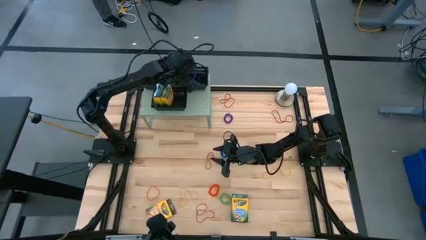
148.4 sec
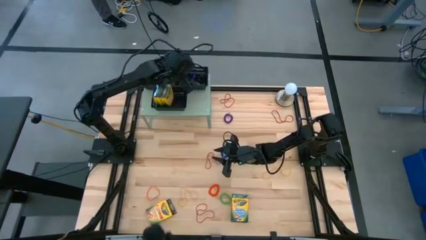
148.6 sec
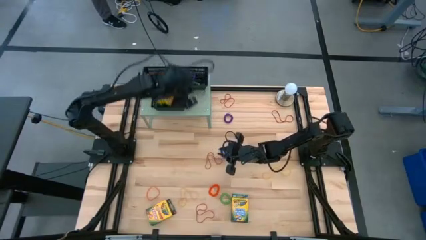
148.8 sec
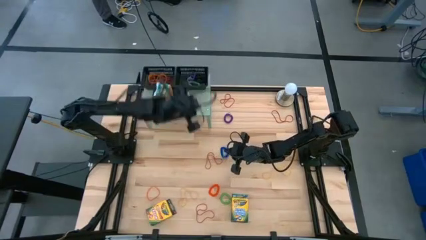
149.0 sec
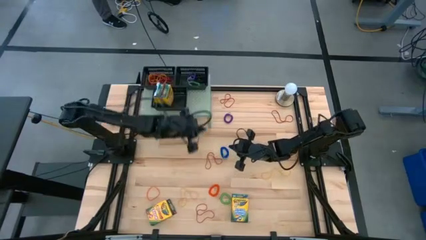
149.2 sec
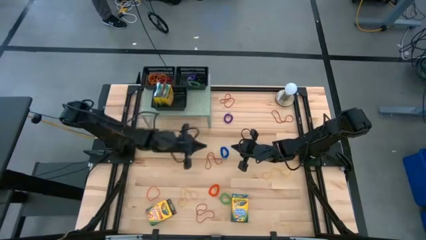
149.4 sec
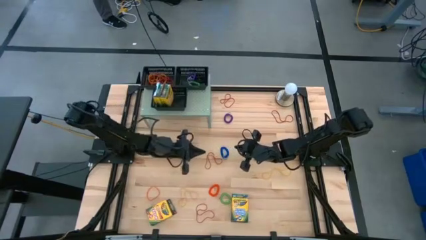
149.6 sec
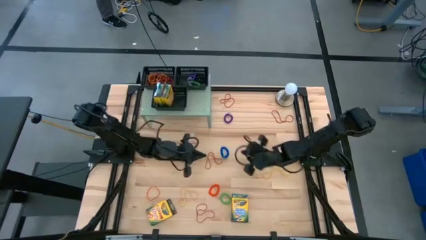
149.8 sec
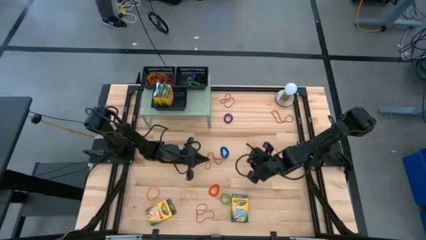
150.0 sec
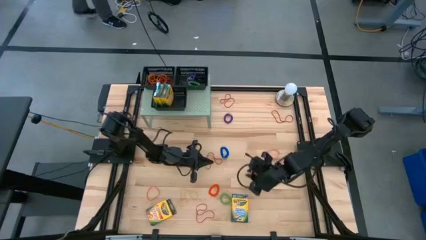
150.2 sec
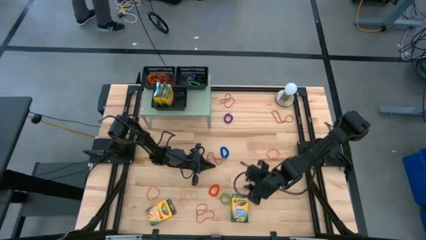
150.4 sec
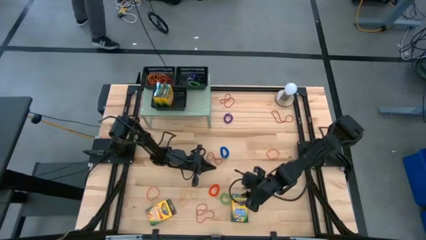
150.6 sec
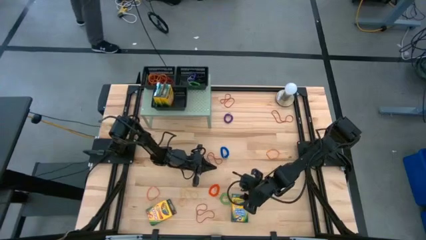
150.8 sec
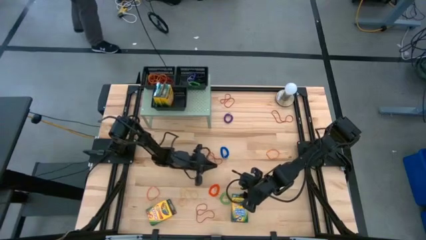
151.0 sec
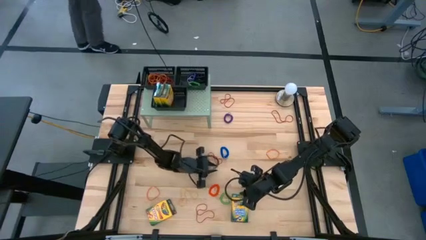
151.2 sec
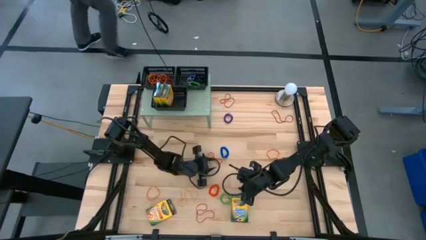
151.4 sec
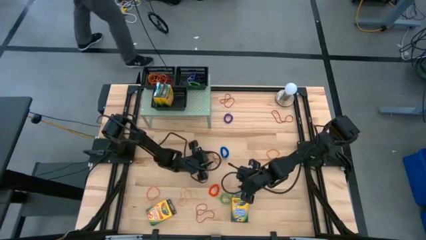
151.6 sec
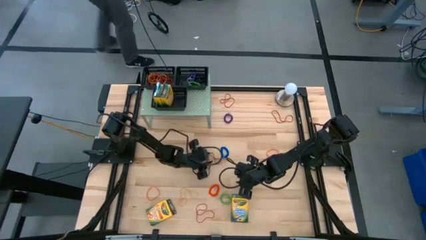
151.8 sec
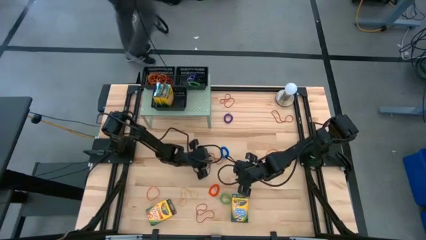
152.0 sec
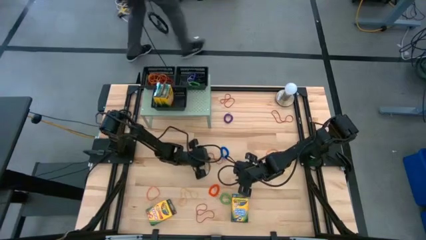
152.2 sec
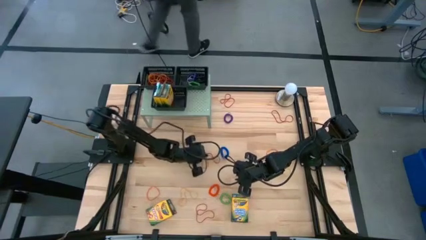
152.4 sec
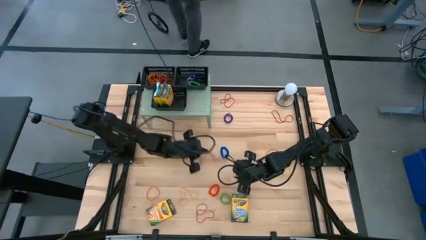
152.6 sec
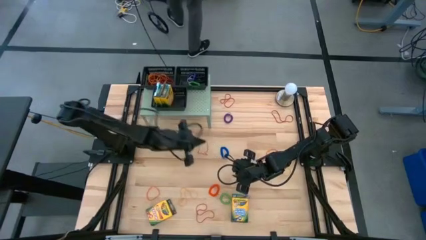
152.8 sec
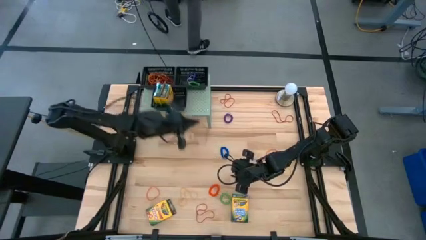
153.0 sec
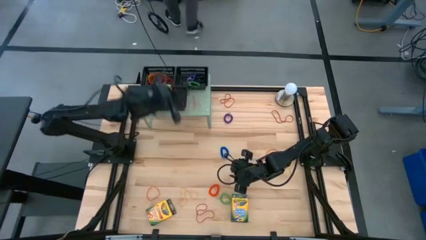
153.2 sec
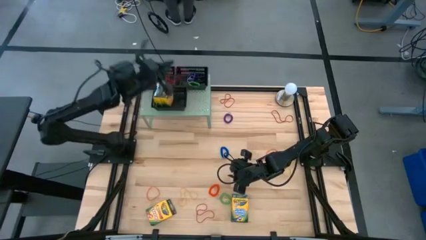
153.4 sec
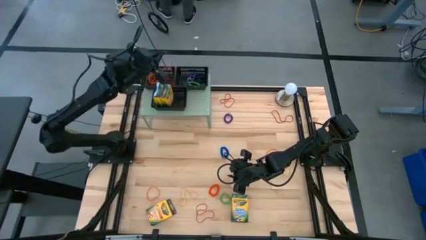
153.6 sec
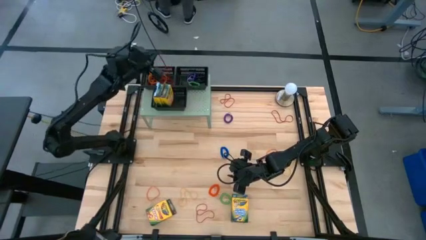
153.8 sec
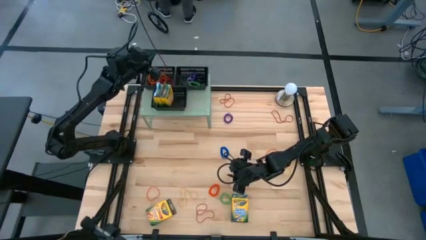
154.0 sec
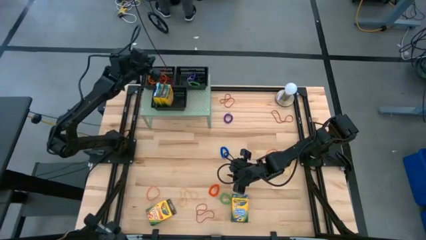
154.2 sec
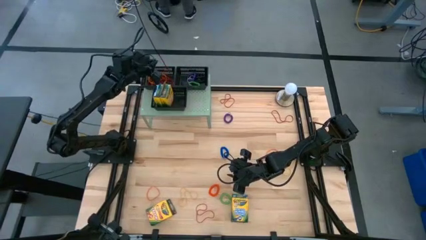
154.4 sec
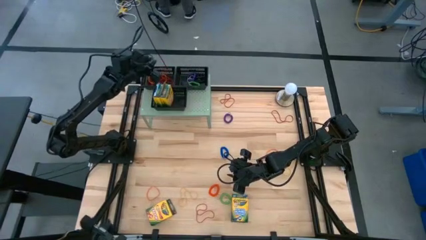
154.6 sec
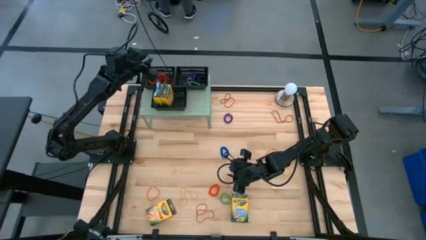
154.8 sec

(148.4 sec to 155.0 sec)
Task: Pick & Place Office Desk Supplies
Put the red rubber band into the top left black bin on the shelf

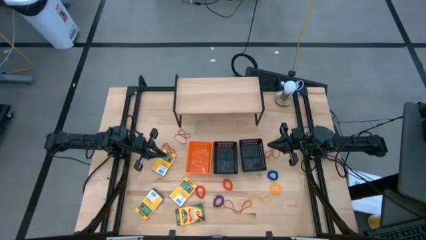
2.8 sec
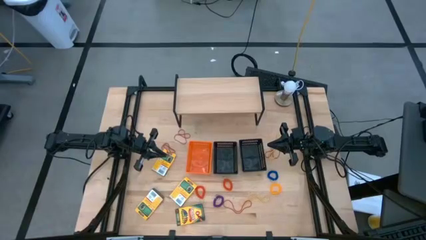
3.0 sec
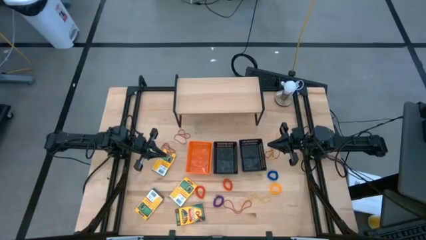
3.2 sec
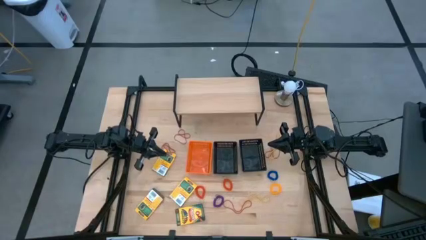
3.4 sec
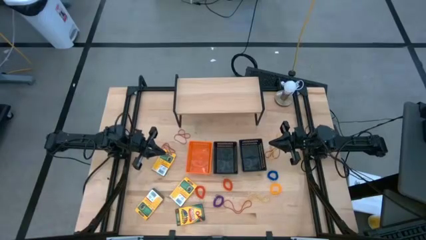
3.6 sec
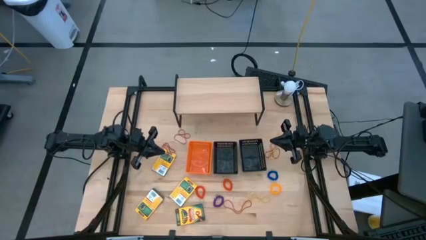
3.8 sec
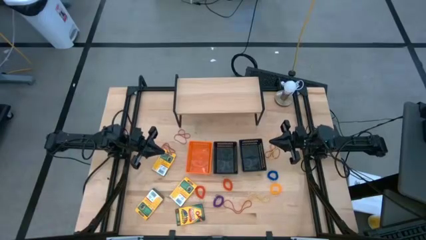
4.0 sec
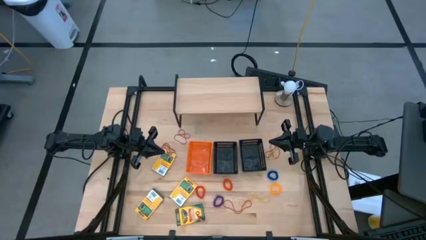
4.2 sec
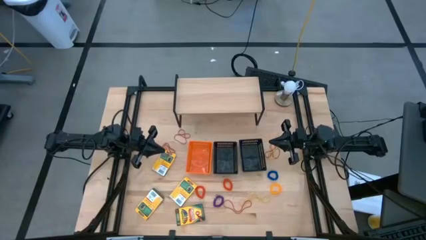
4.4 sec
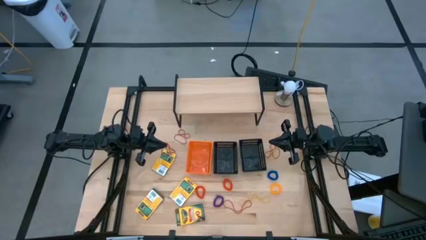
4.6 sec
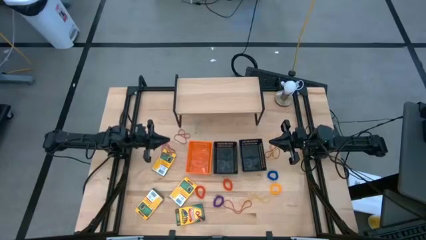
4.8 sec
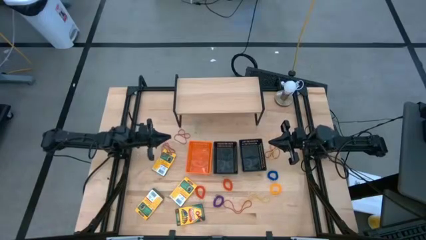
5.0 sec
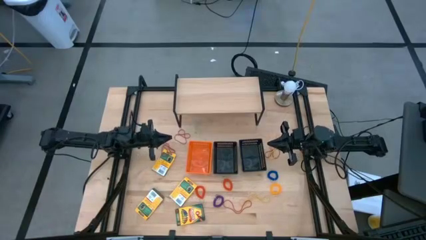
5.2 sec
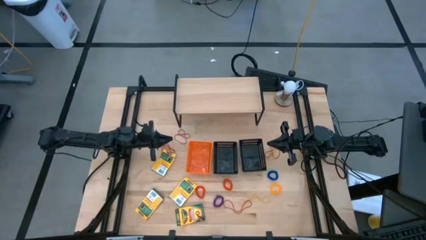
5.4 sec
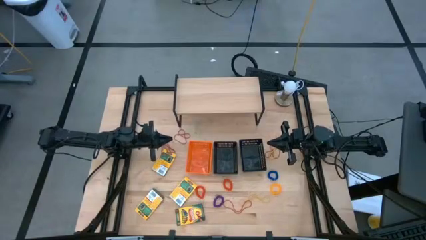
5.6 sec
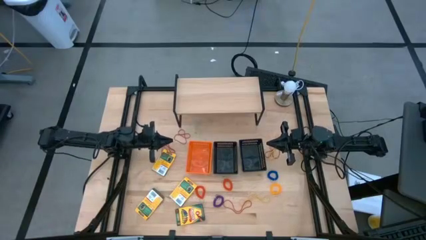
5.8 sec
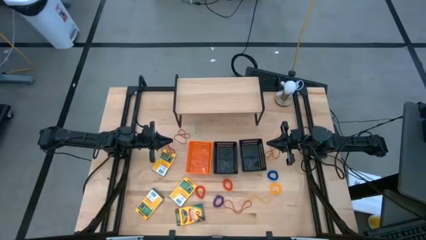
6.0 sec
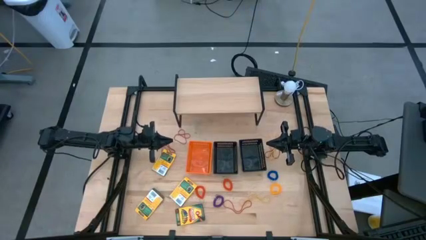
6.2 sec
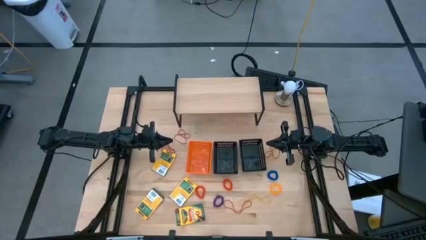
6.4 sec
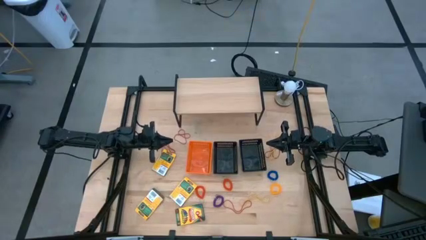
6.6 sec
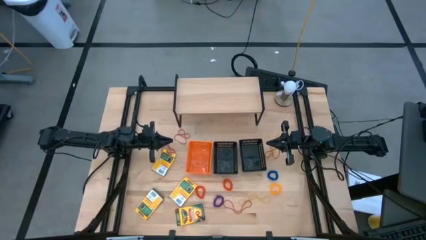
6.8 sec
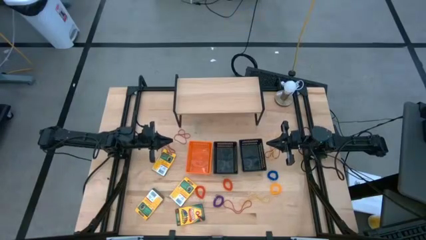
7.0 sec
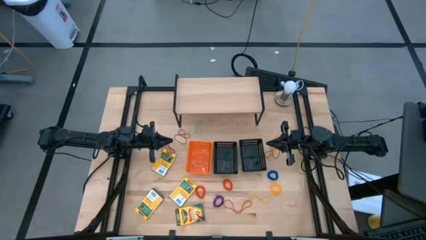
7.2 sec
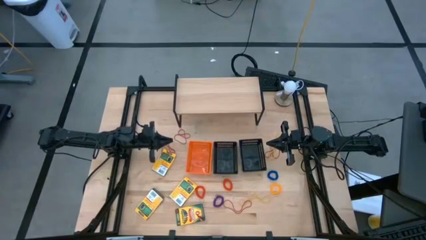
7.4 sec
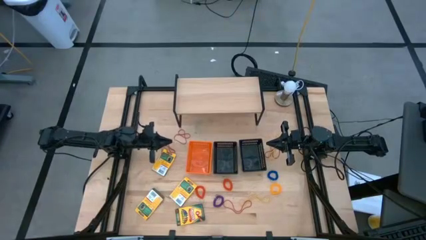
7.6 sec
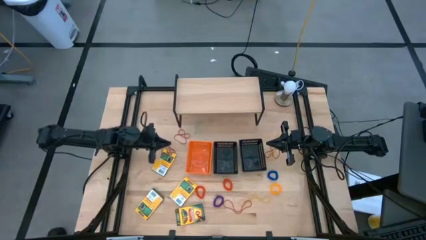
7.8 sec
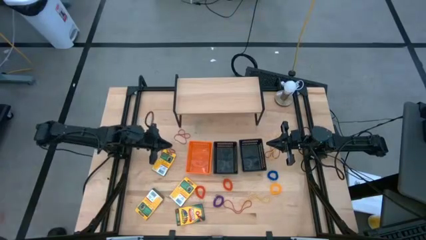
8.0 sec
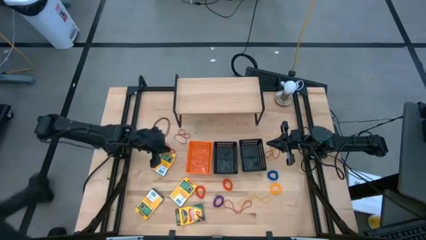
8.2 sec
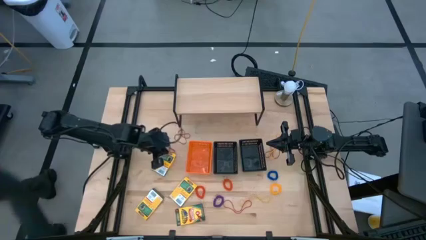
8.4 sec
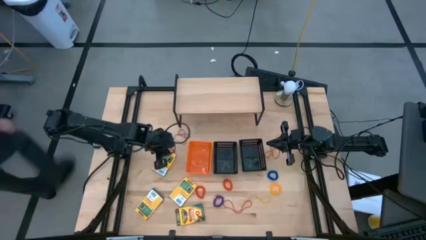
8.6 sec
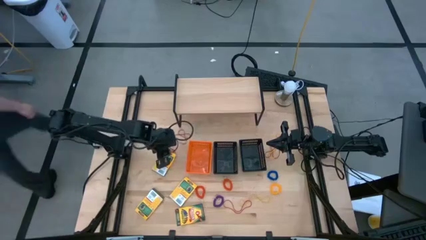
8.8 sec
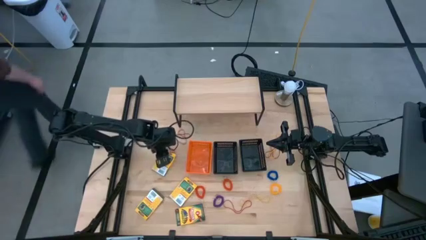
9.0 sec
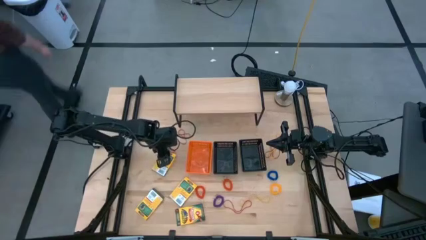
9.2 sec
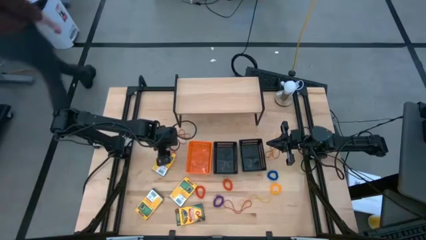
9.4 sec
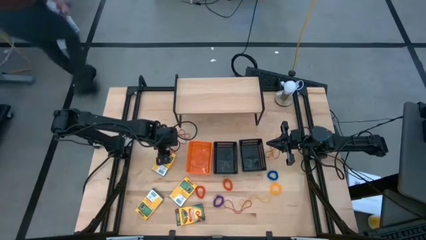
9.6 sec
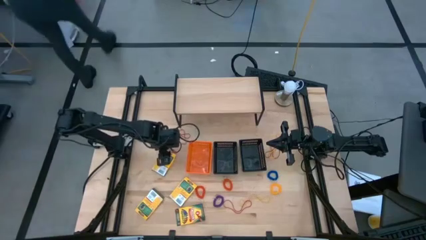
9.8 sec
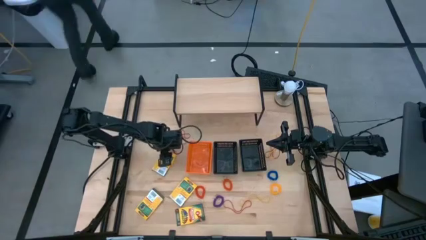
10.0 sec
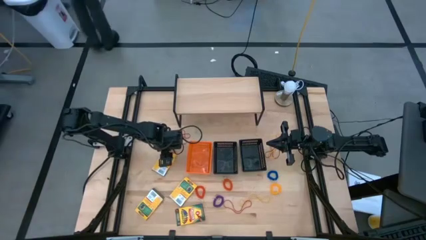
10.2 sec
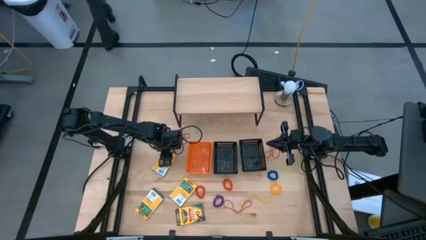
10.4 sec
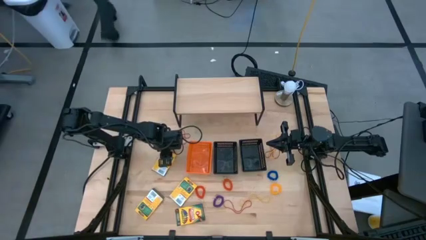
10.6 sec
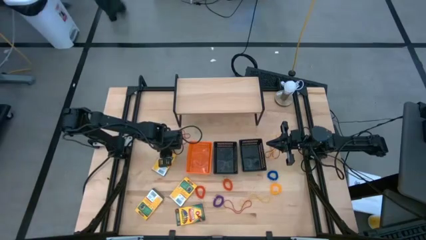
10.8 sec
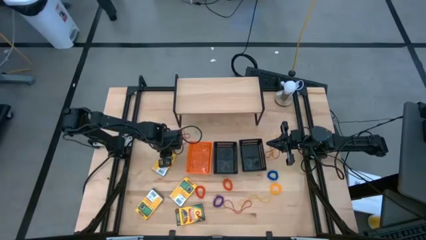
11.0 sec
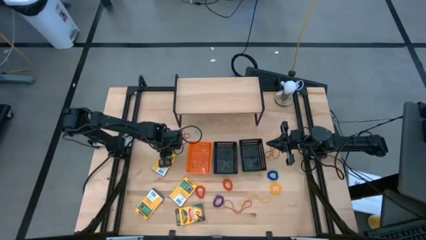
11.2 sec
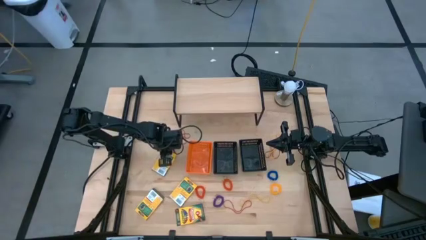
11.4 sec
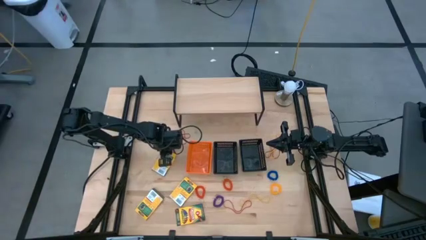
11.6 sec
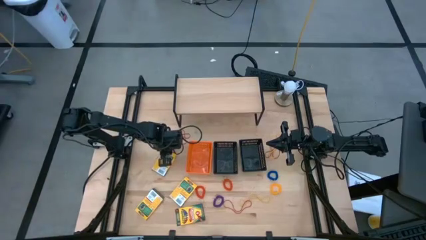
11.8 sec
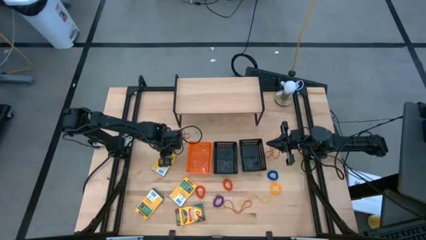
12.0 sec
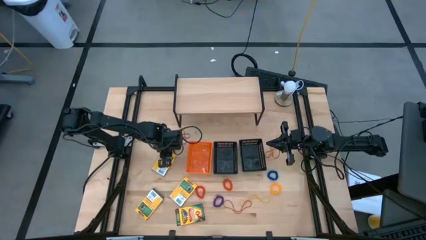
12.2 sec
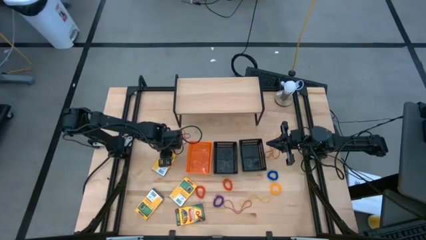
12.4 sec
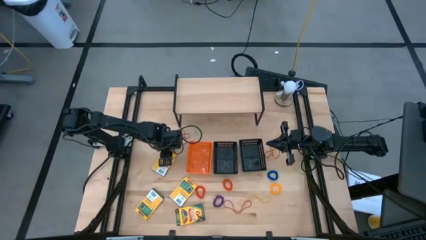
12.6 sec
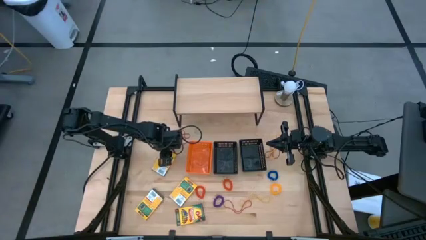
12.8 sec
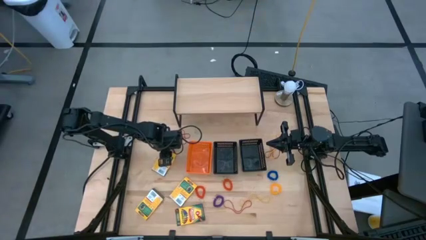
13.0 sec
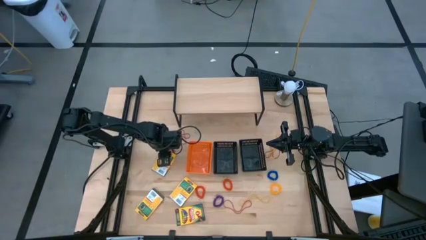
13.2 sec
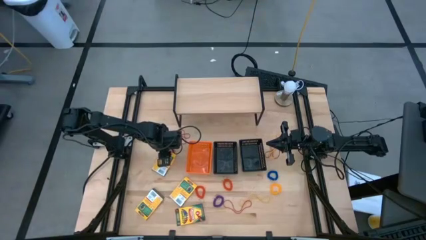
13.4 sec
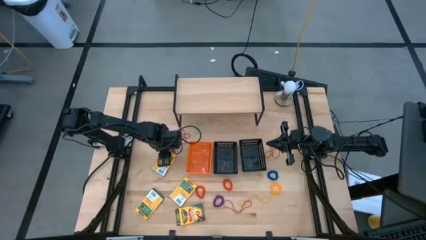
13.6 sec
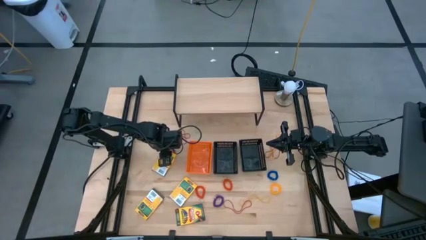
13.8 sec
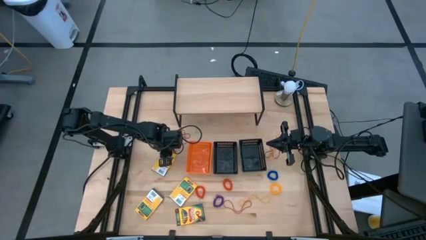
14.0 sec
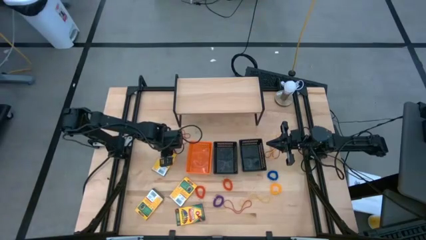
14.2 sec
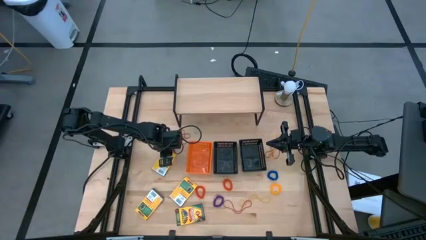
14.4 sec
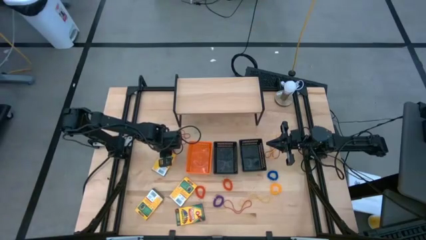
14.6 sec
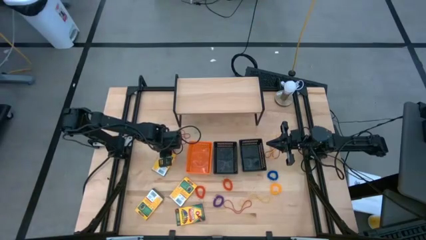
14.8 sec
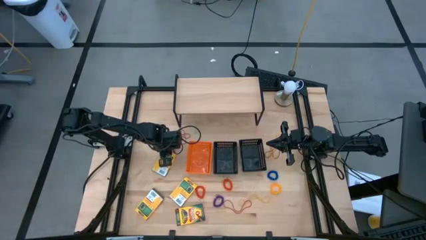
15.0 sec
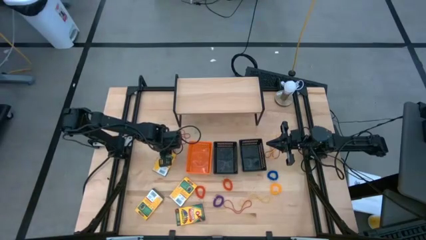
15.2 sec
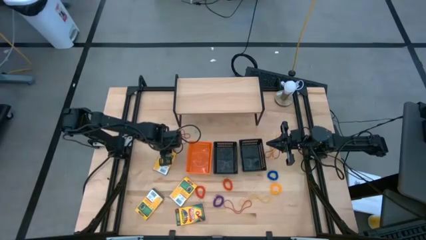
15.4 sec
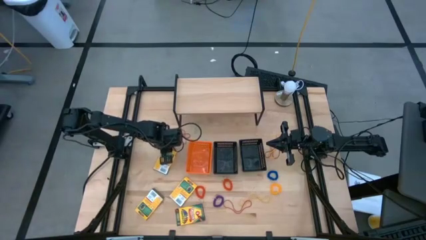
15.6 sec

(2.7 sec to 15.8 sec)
Task: Pick & Place Office Desk Supplies
Put the yellow crayon box into the orange bin
